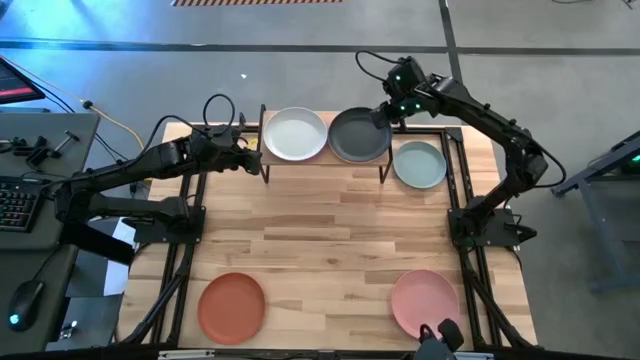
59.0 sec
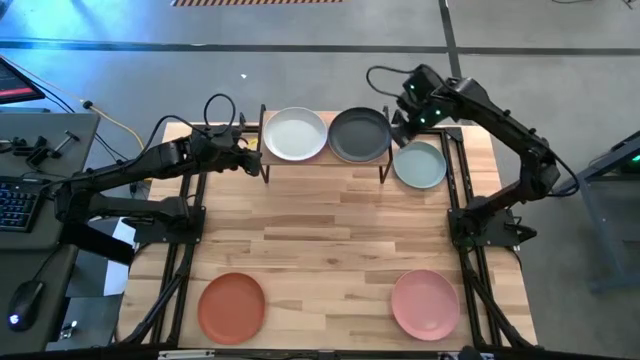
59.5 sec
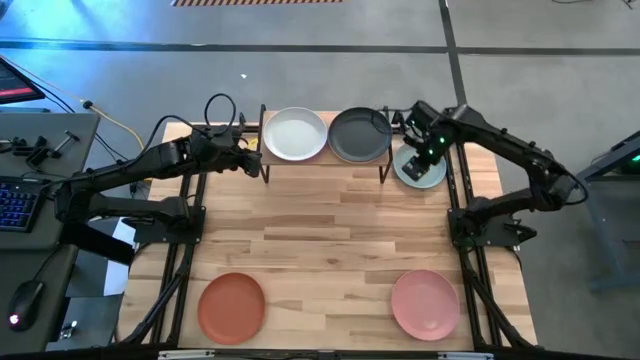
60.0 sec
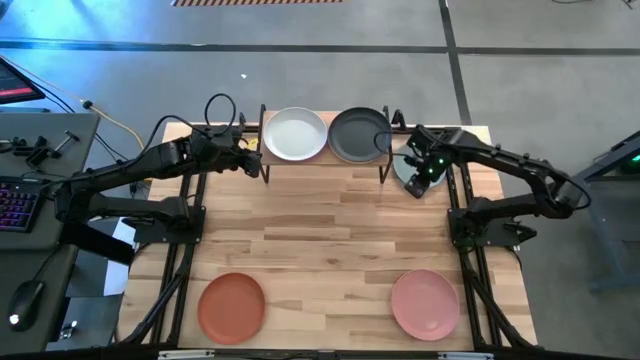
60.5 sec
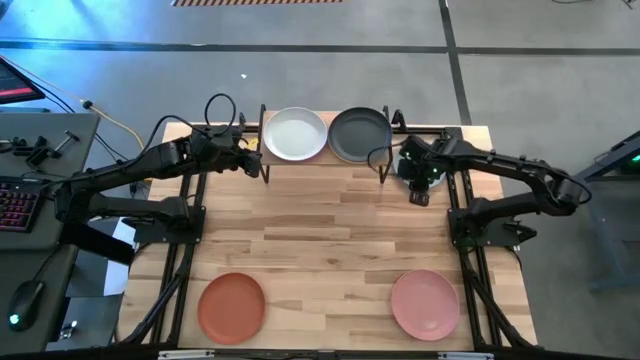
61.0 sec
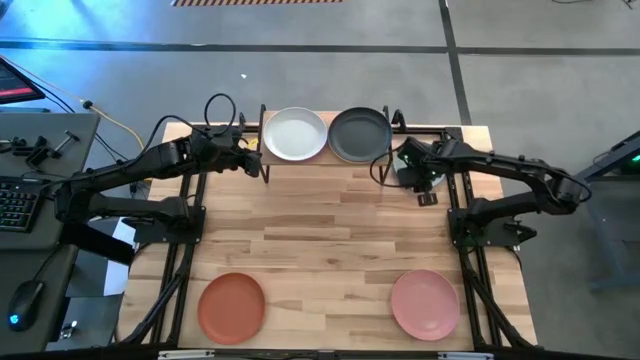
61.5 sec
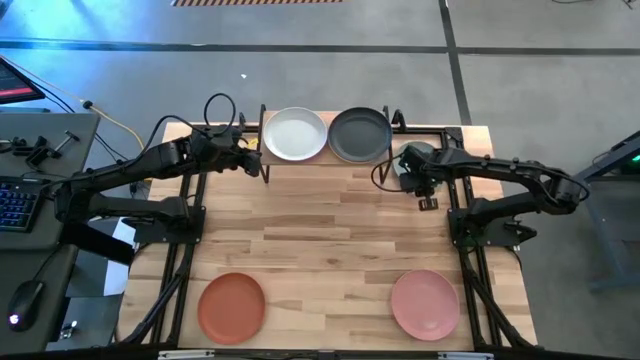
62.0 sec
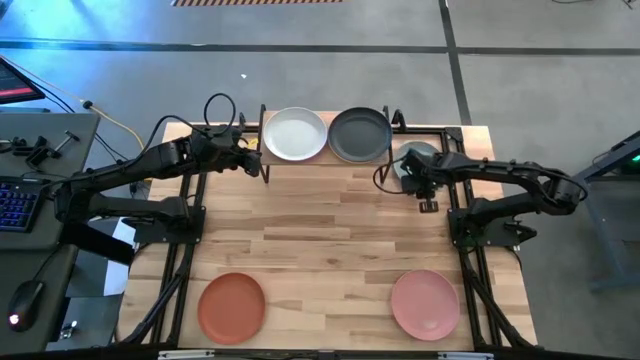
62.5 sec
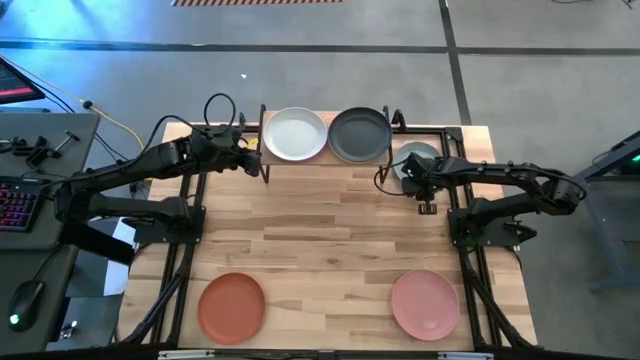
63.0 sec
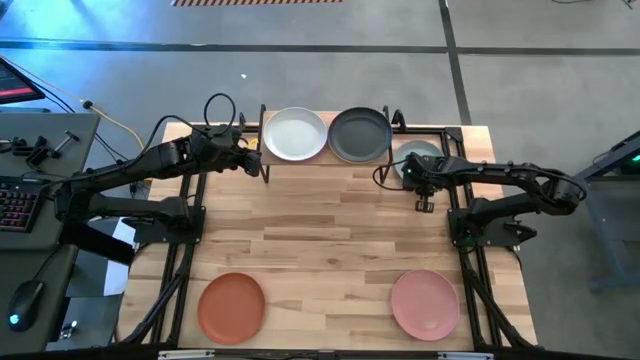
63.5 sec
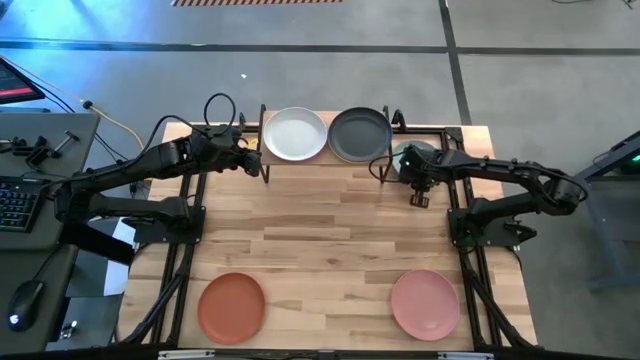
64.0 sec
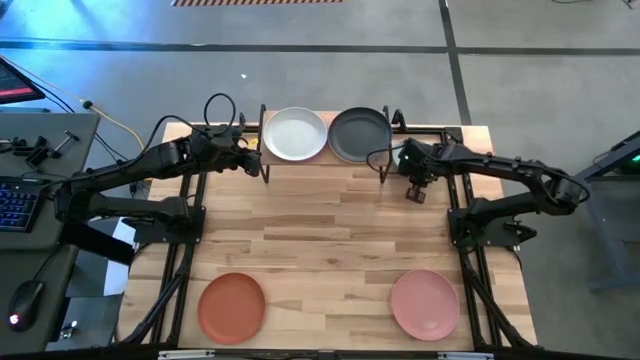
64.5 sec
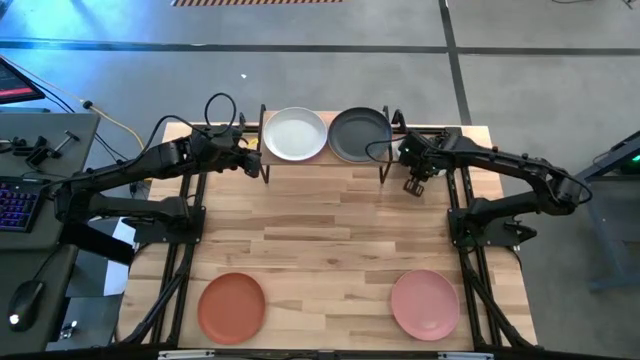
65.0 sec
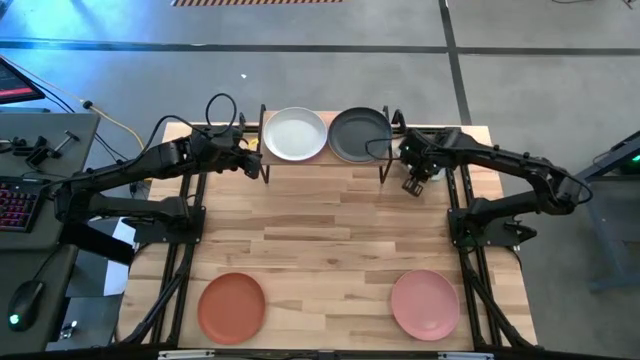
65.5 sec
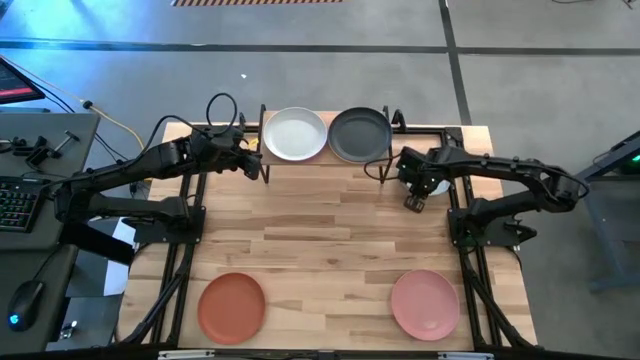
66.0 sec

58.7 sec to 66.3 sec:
Task: Place and stack plates onto a shelf
Stack the light blue plate on top of the black plate on the shelf

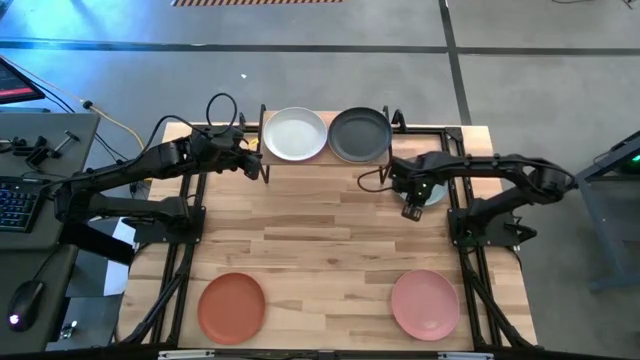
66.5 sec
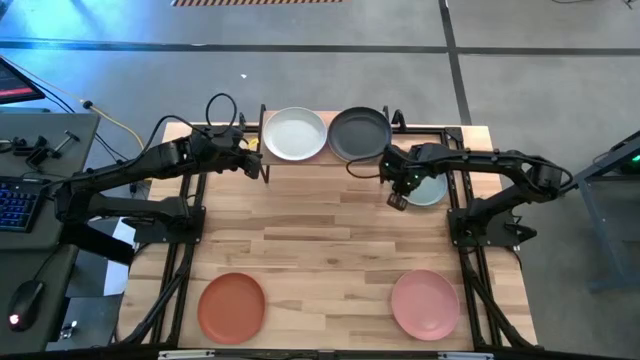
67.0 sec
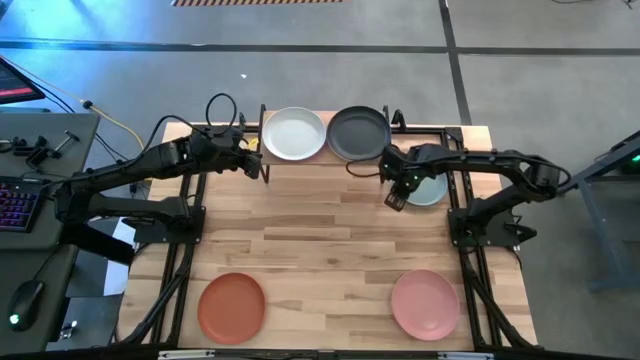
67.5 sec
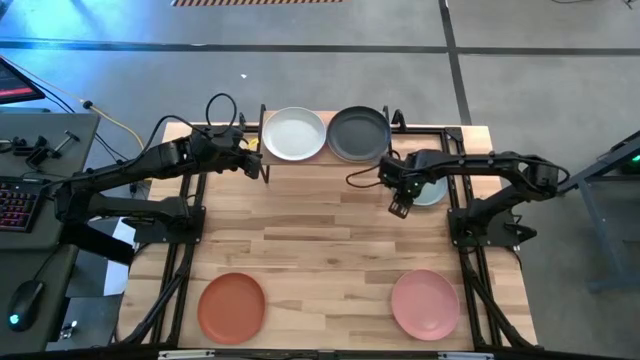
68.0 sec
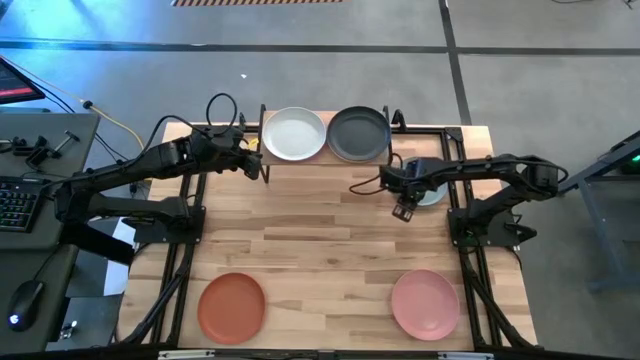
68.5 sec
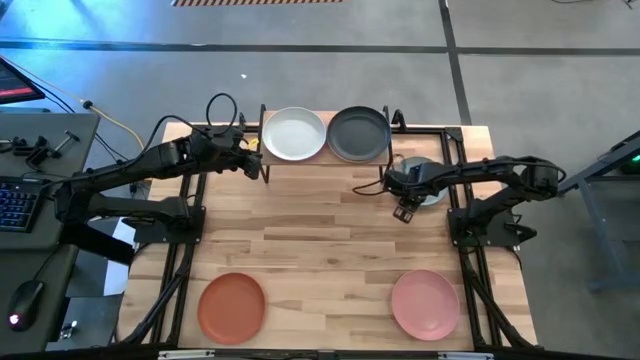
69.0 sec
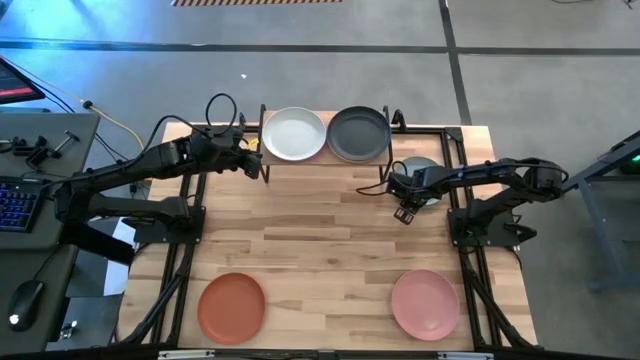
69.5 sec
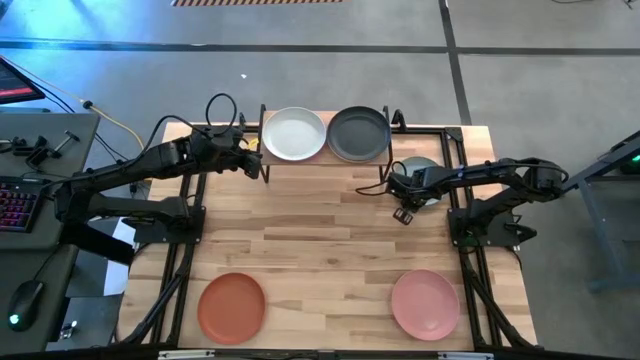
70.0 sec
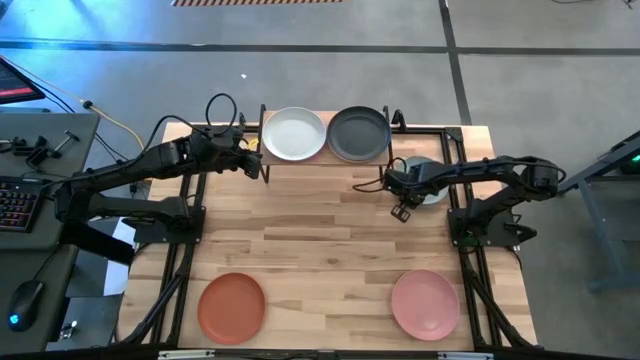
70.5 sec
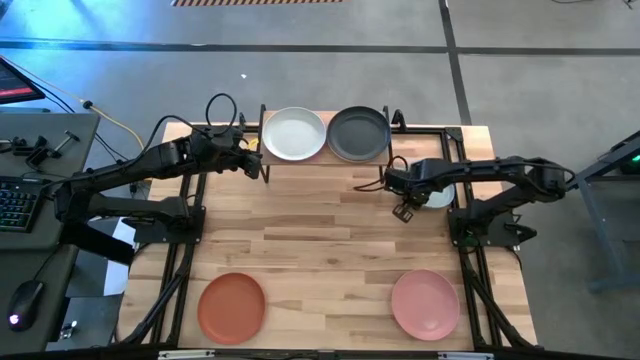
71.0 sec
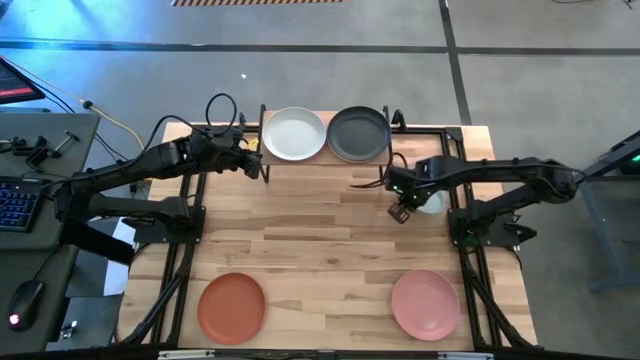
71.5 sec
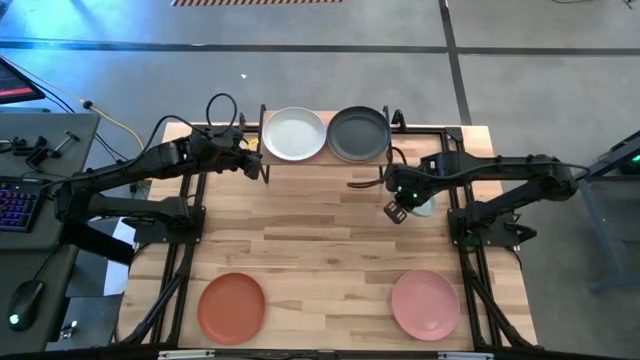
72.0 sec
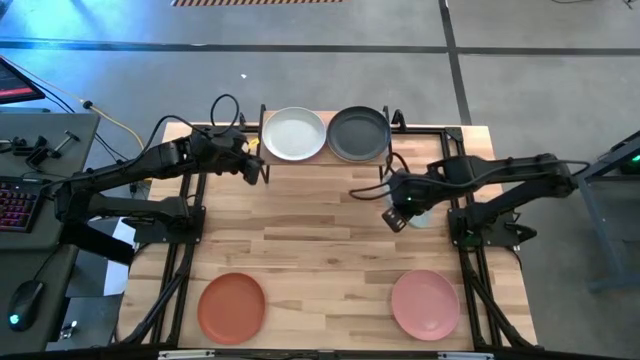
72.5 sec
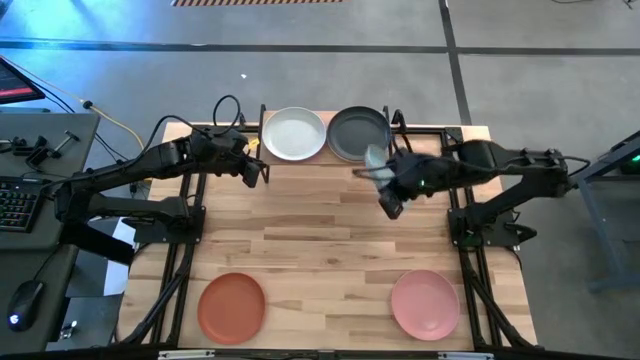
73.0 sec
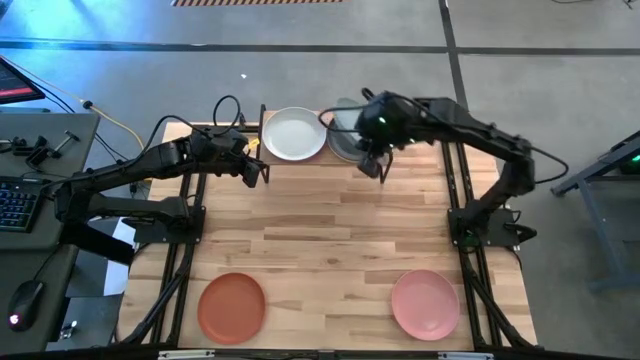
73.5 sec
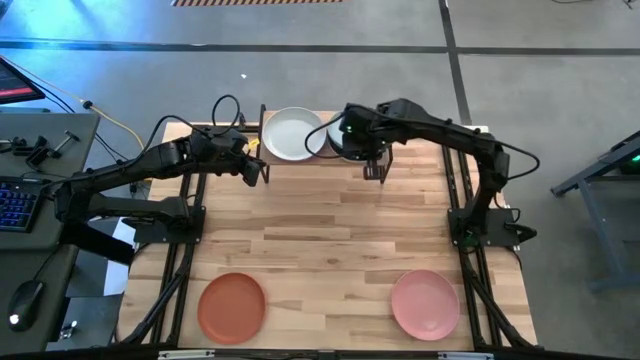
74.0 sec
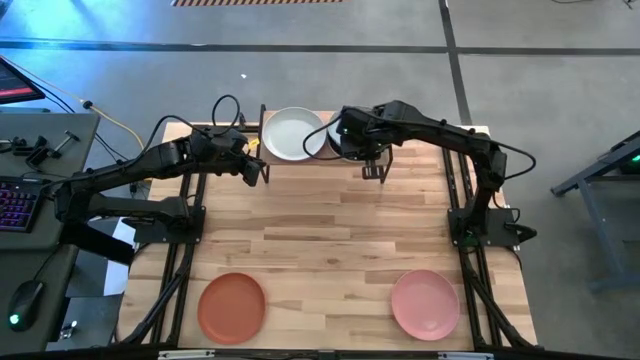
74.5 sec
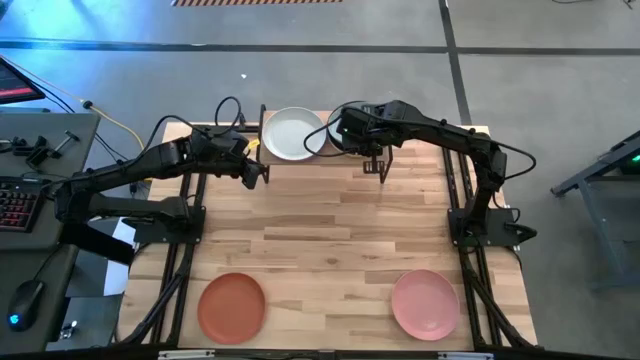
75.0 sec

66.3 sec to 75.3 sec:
Stack the light blue plate on top of the black plate on the shelf

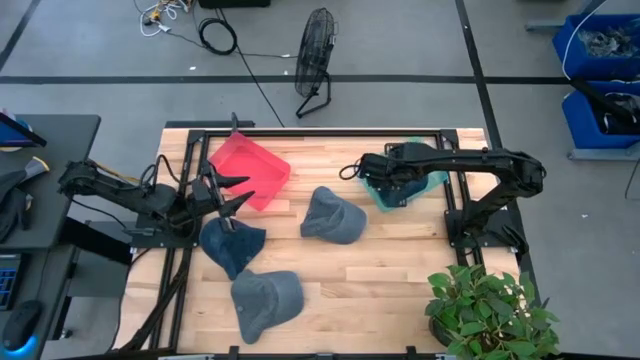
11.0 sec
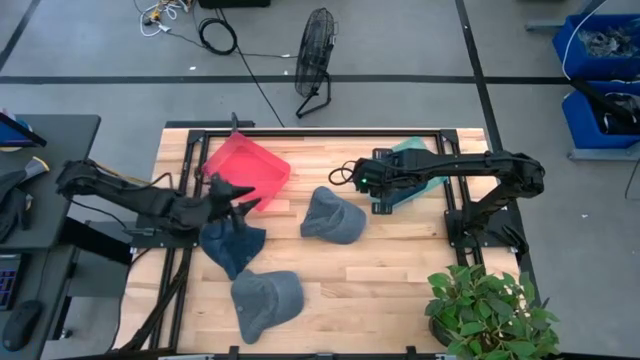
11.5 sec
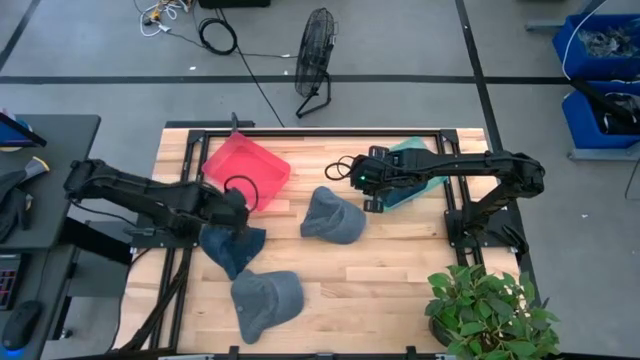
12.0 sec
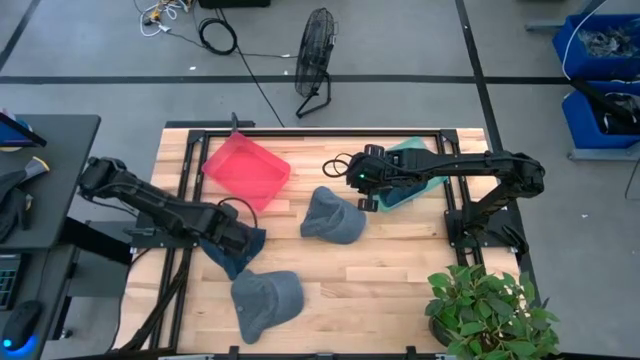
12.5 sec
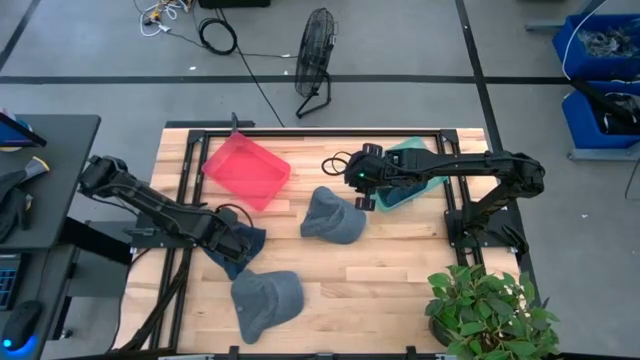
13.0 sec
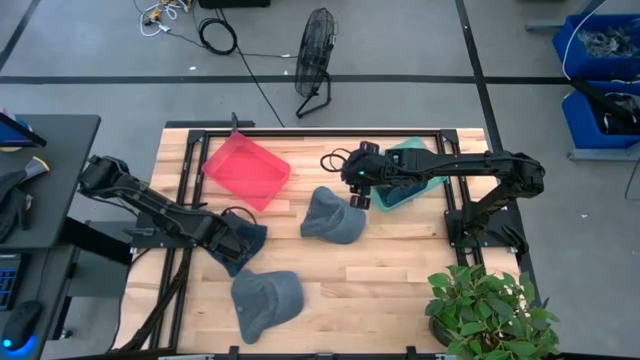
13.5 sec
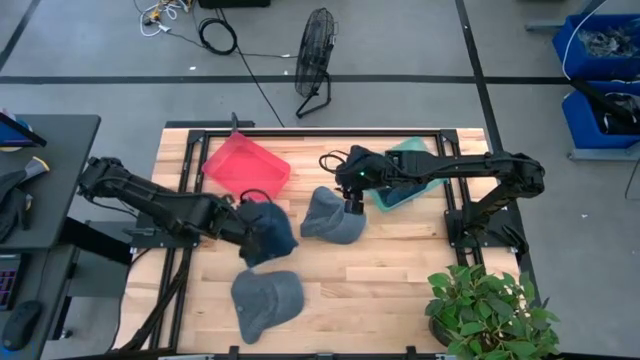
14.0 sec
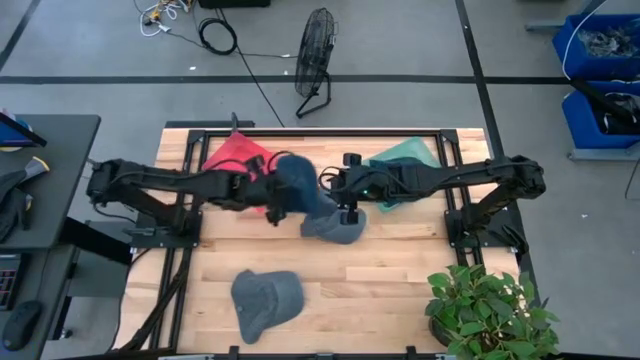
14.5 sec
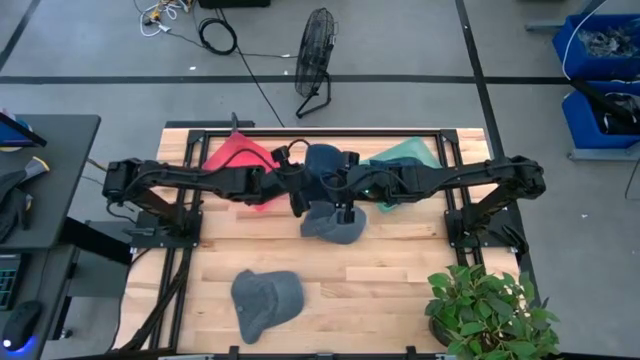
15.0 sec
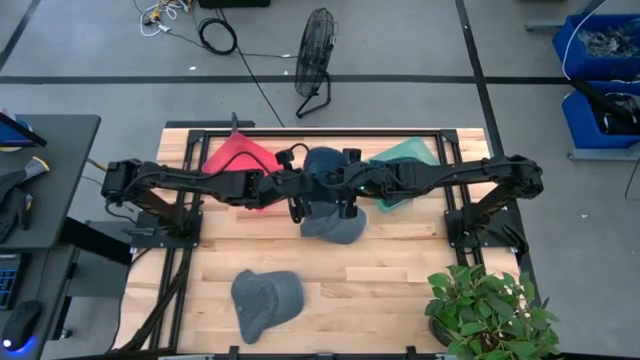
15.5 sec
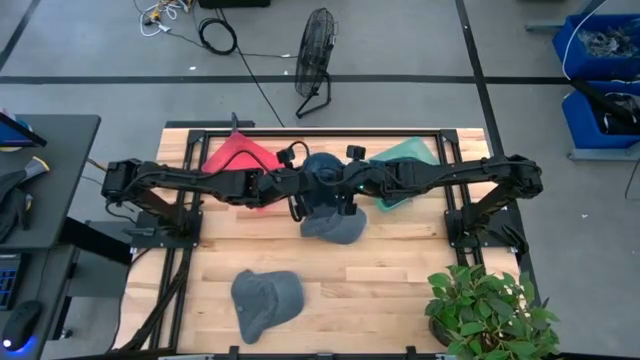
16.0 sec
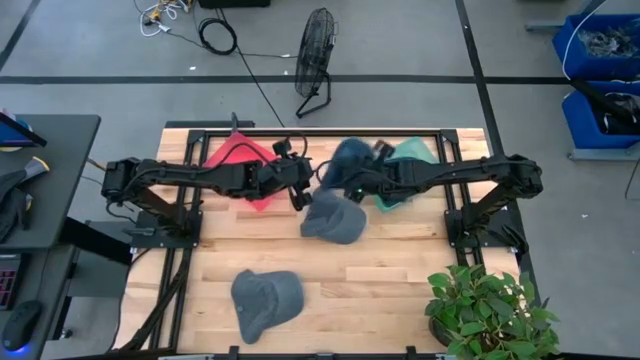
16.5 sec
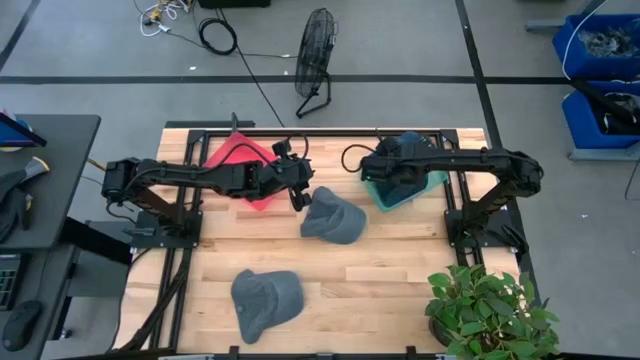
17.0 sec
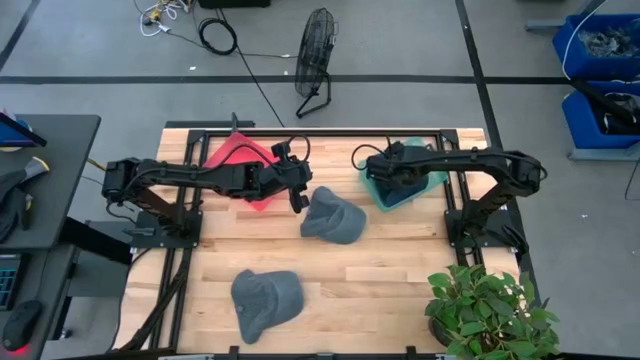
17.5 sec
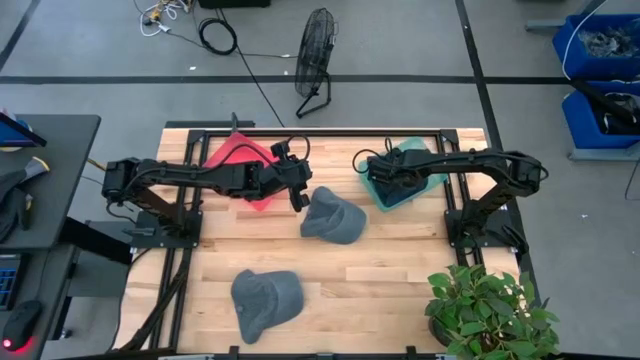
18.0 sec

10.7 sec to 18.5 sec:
Task: Pick & Place hat
Put the blue cap into the green bin
